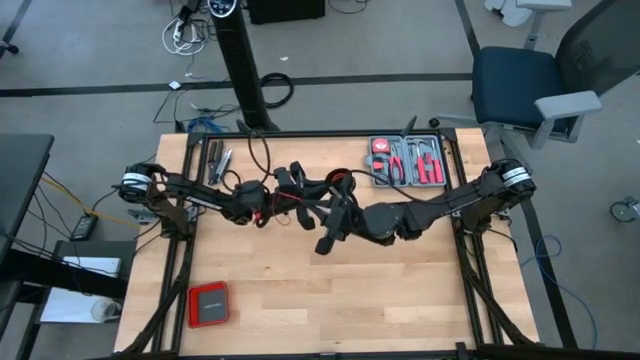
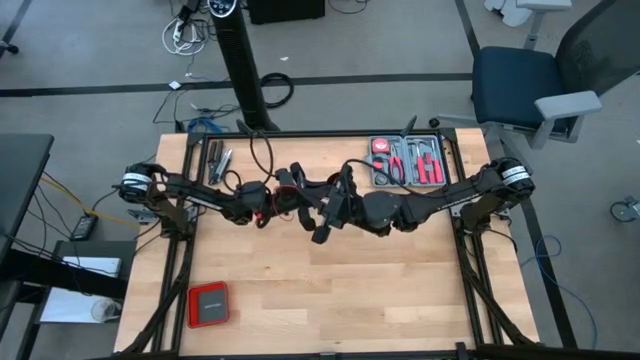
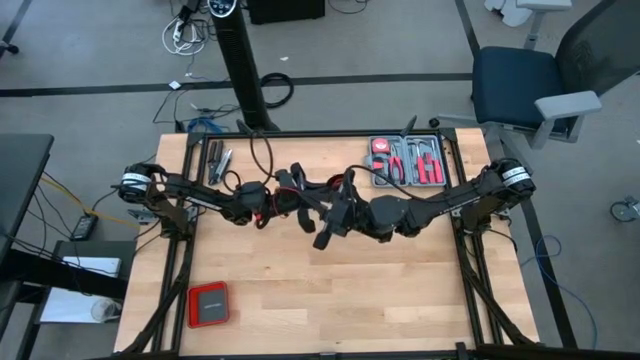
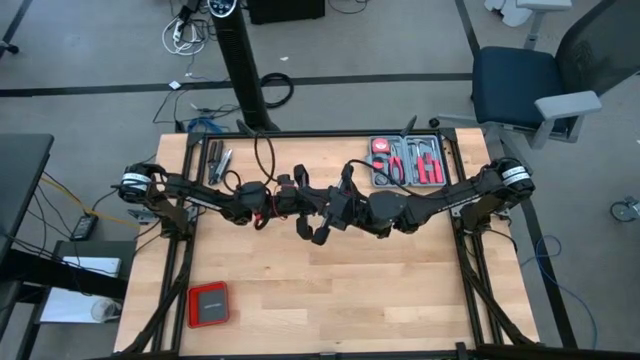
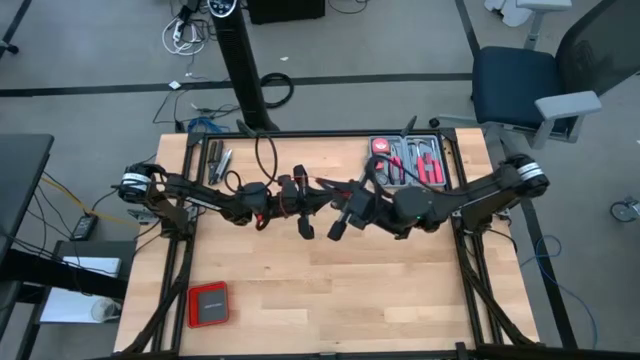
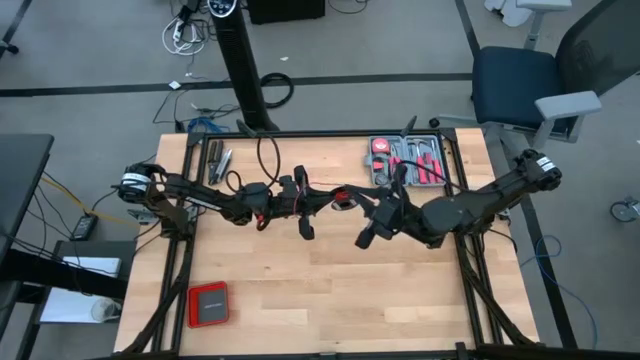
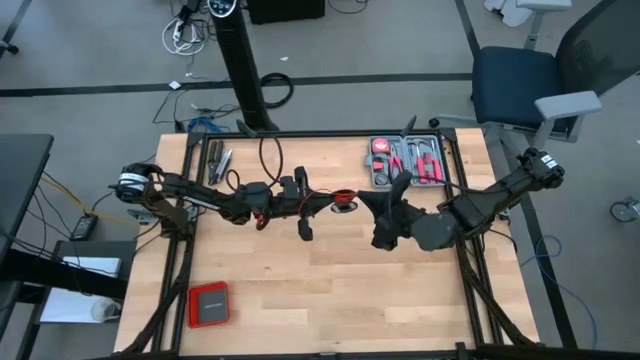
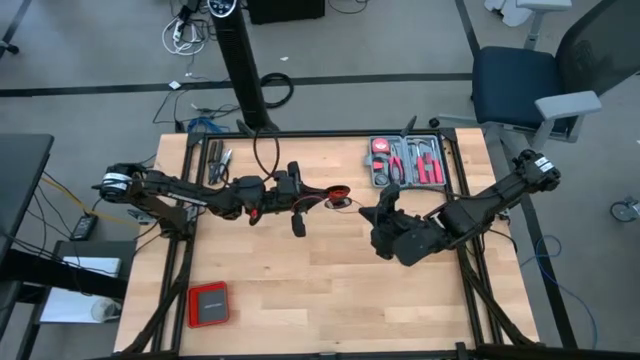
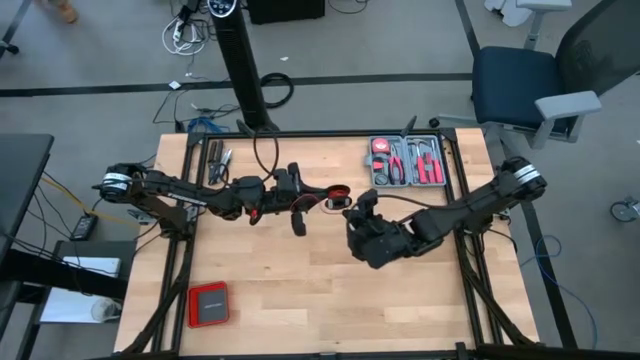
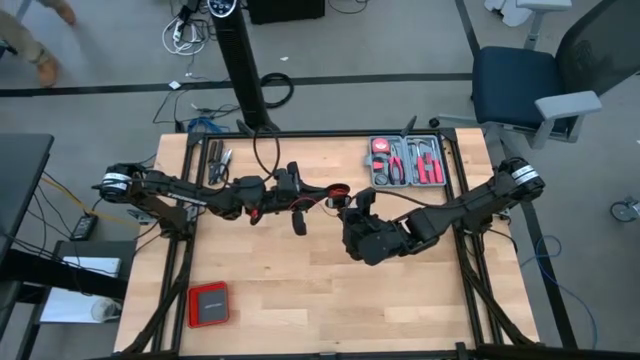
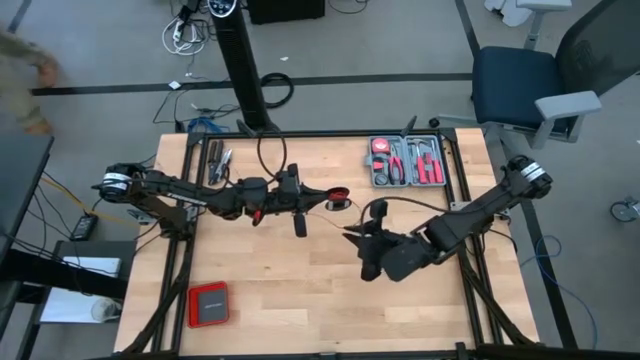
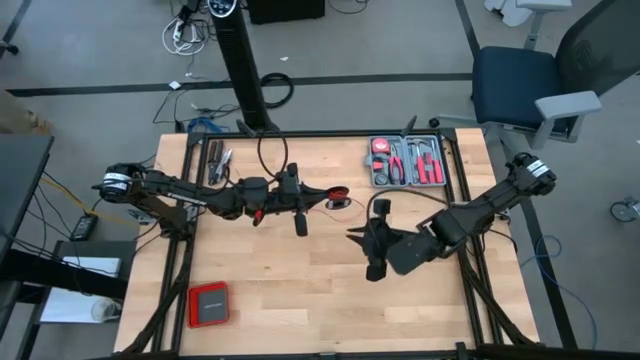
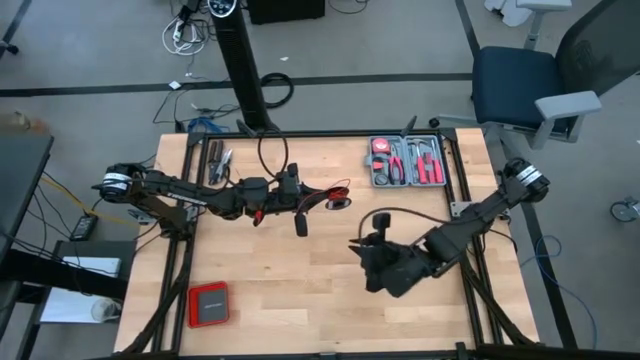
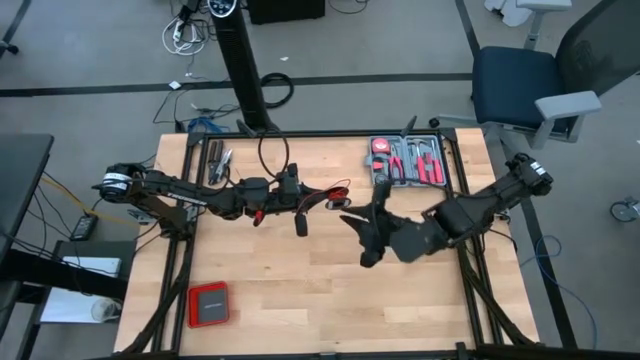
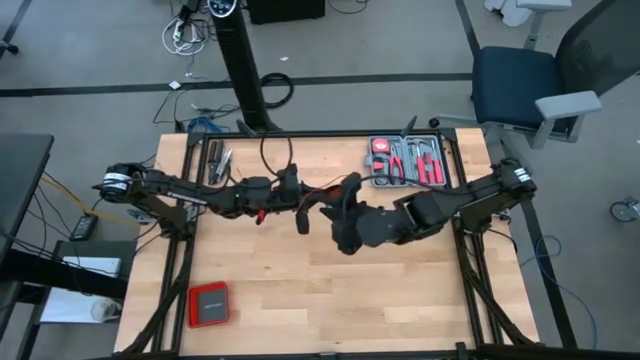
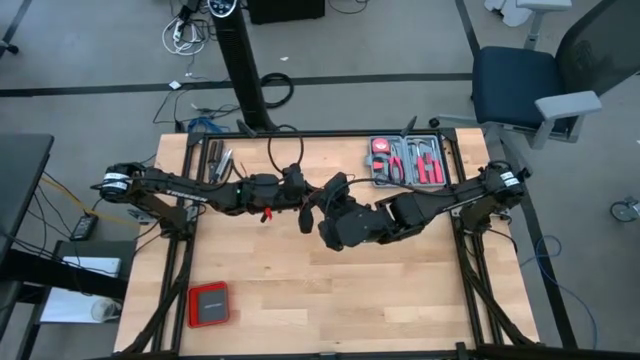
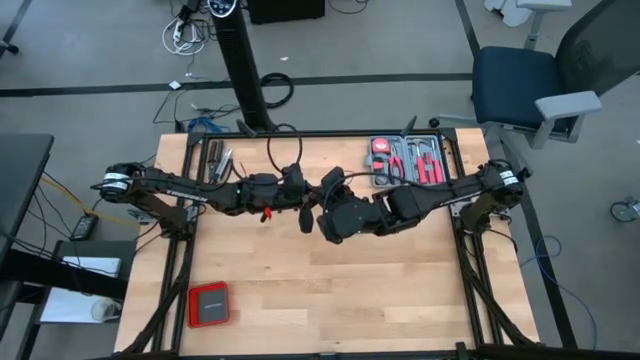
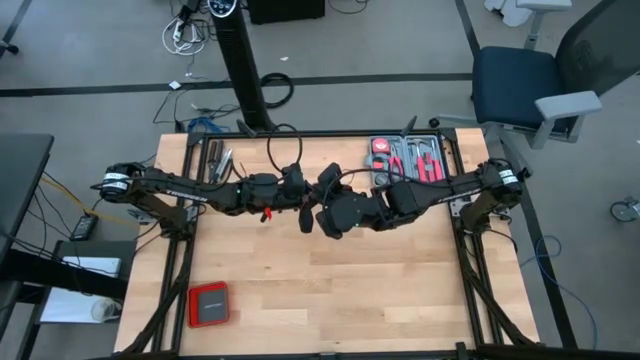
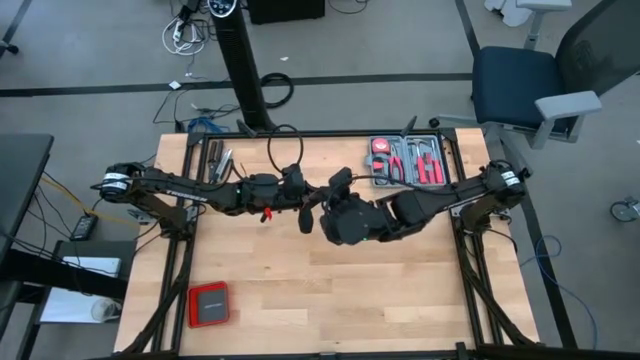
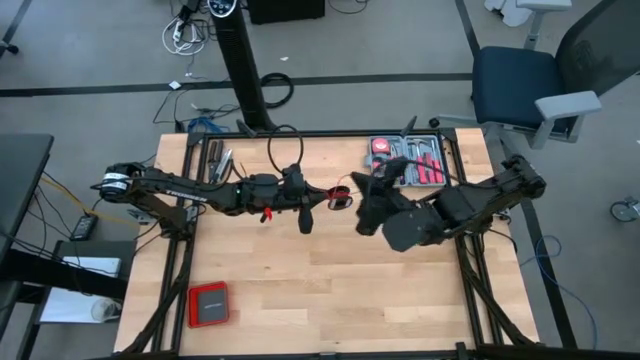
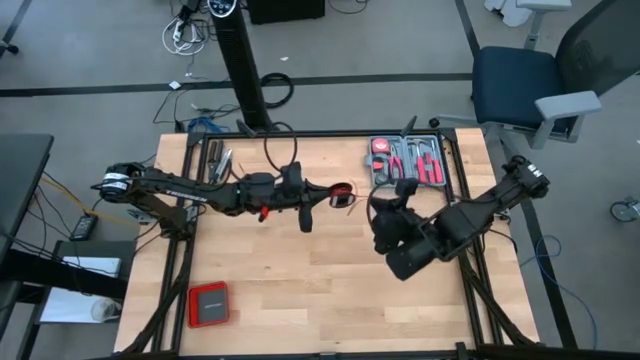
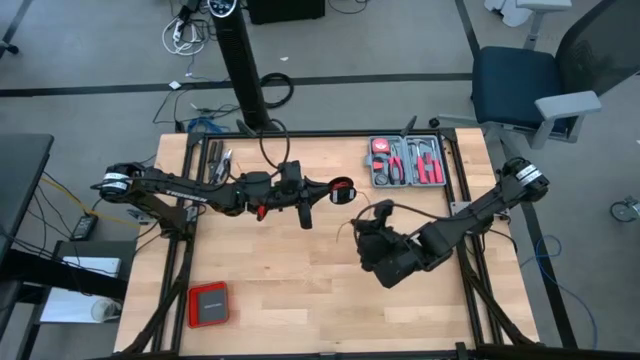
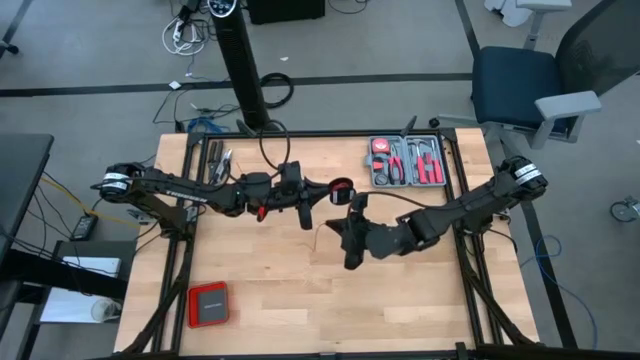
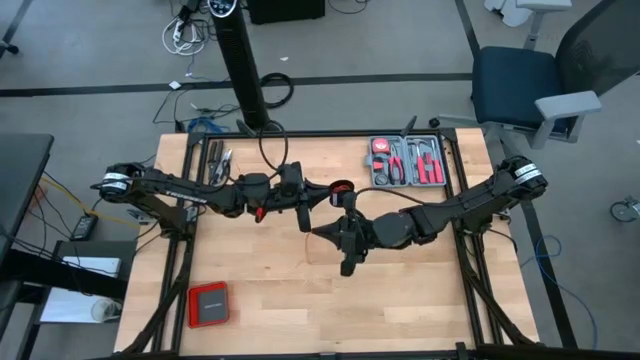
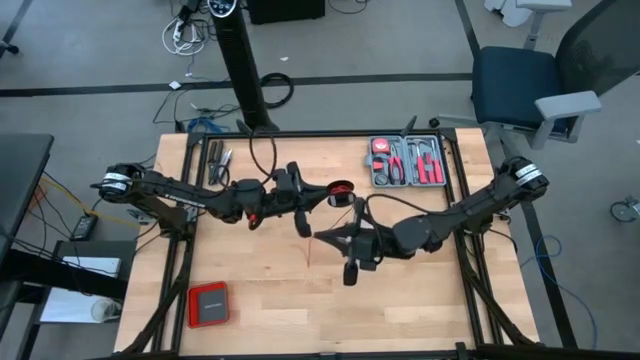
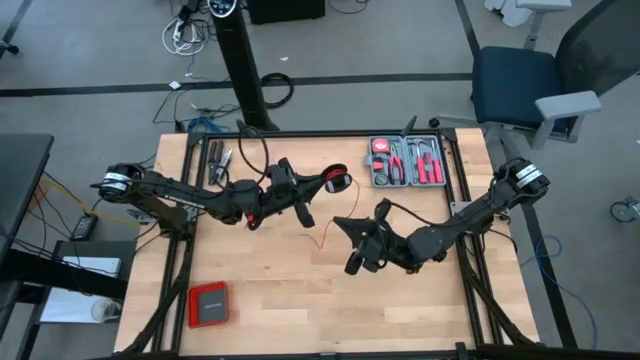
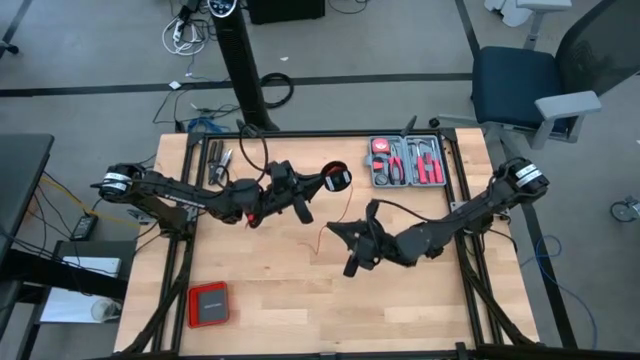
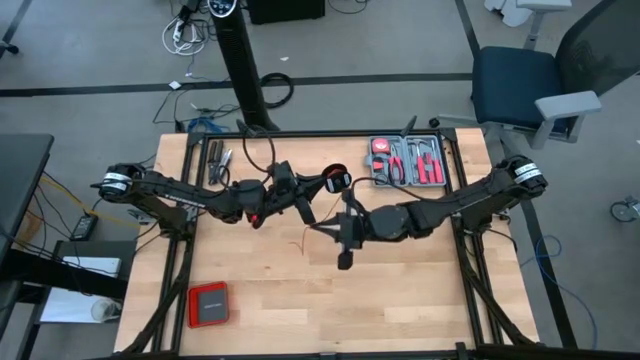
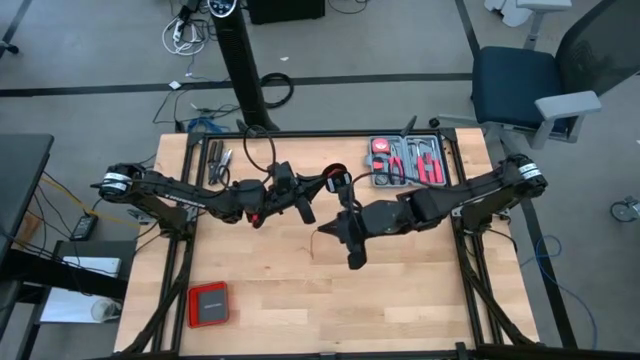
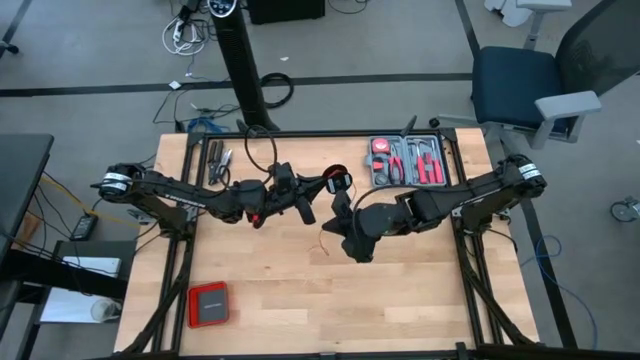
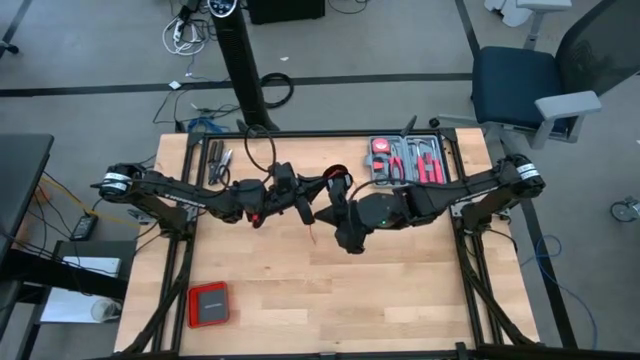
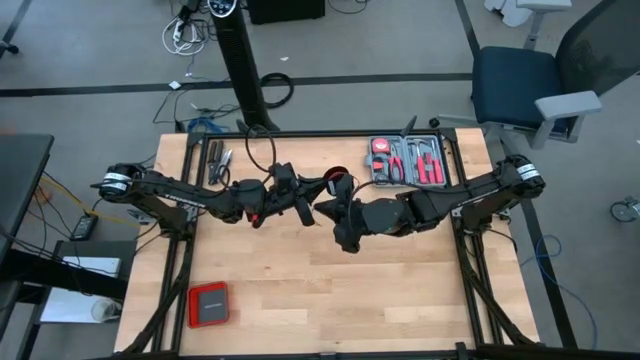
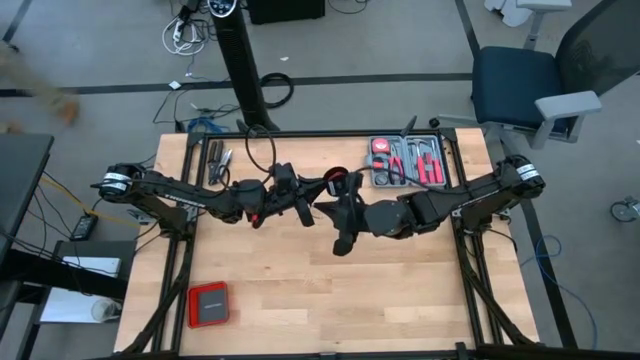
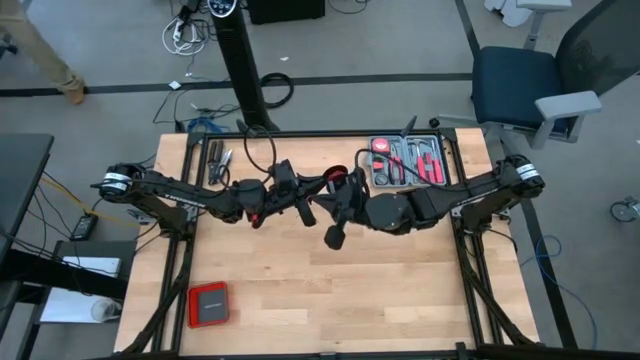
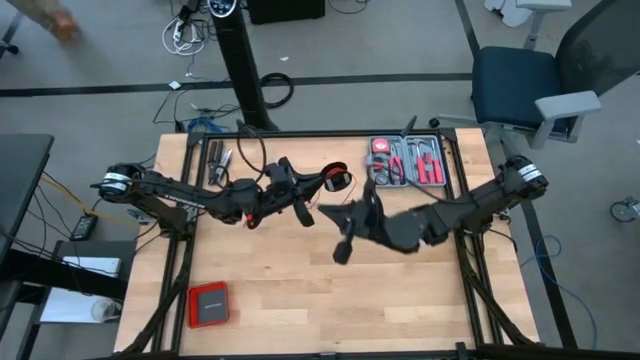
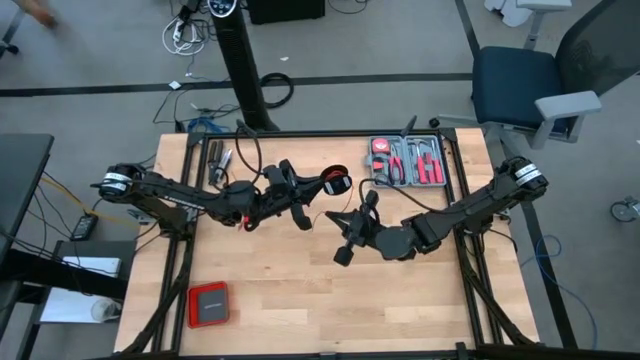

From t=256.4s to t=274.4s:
Task: Coil cords
Coil the red cable wire onto the black spool

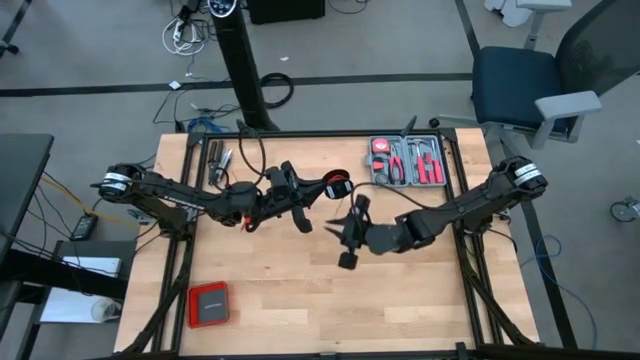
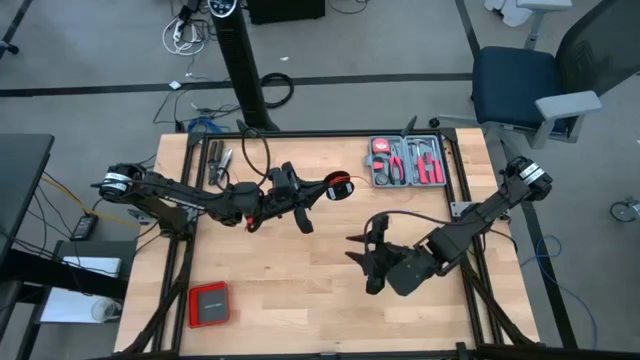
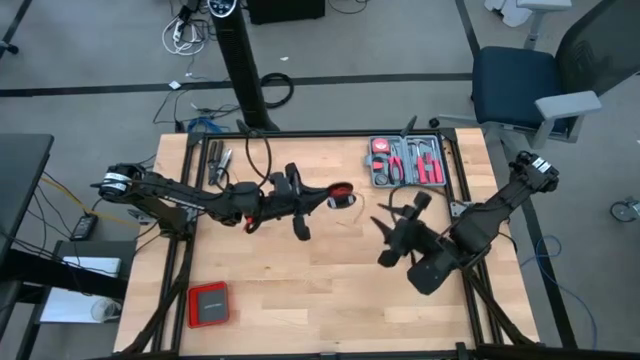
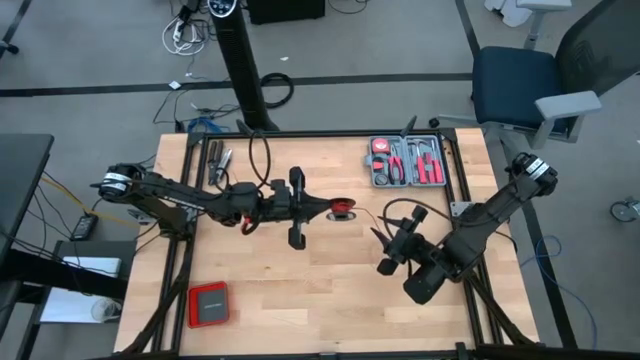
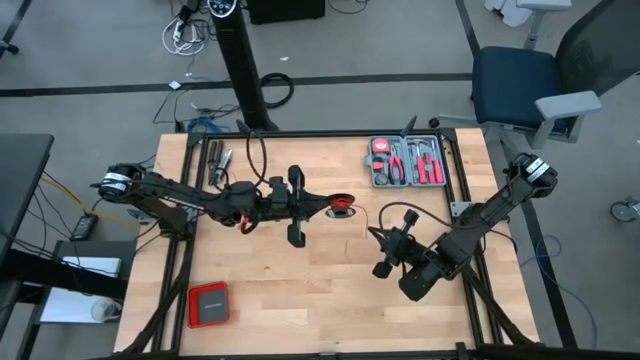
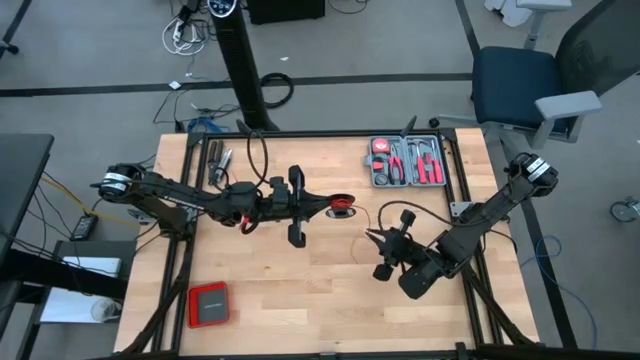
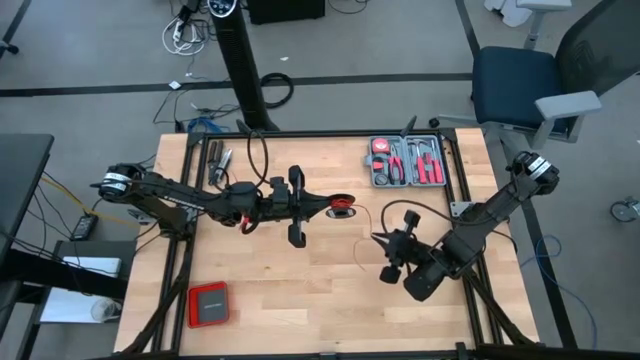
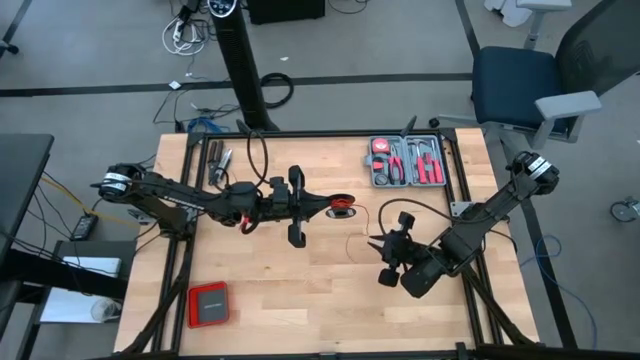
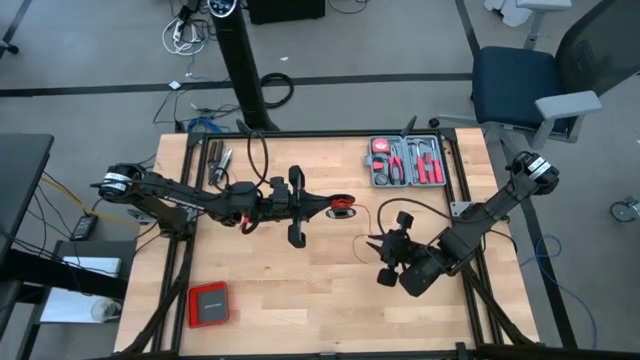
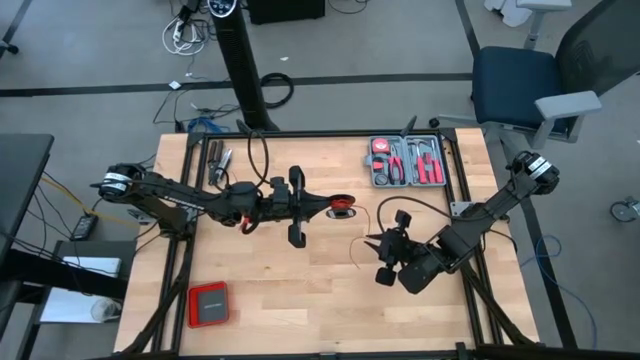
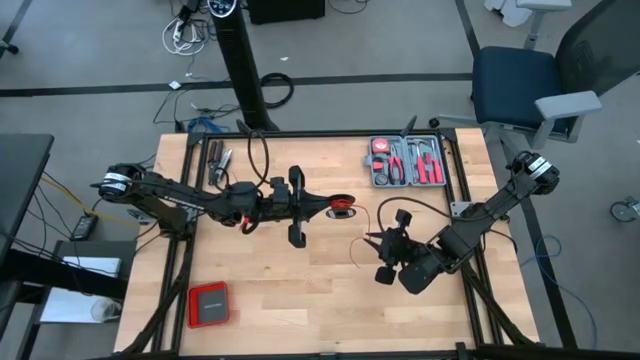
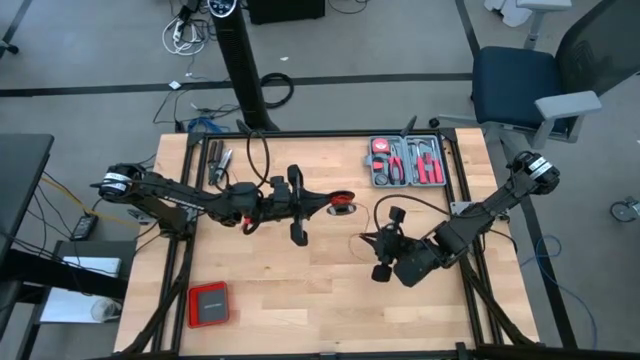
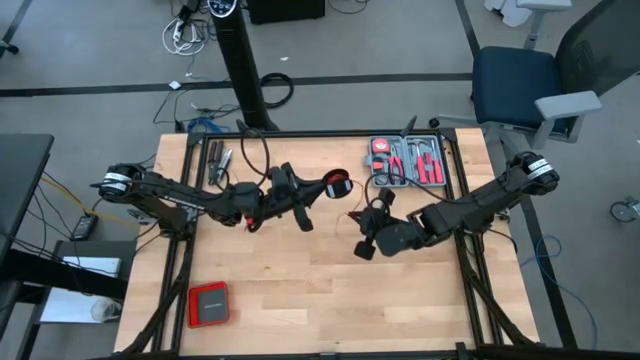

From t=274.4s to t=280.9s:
Coil the red cable wire onto the black spool
